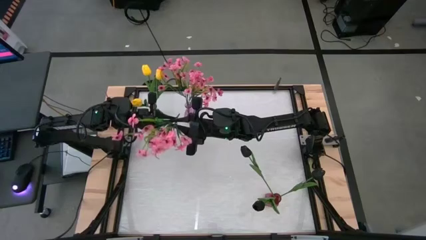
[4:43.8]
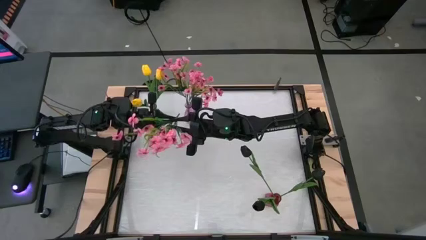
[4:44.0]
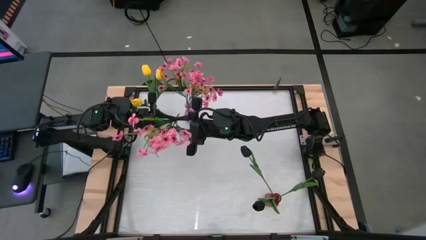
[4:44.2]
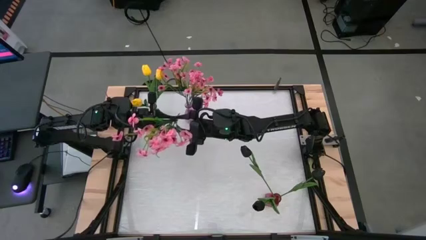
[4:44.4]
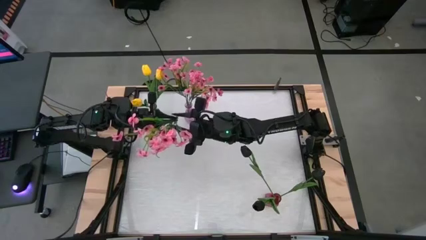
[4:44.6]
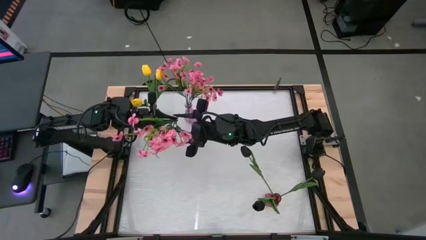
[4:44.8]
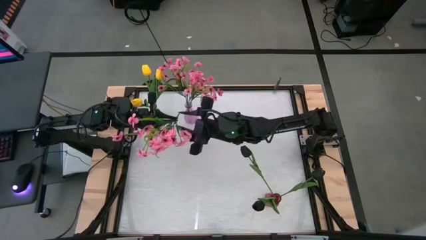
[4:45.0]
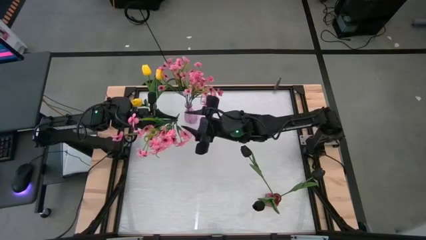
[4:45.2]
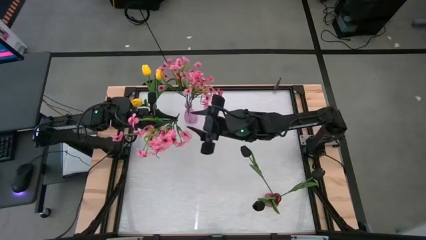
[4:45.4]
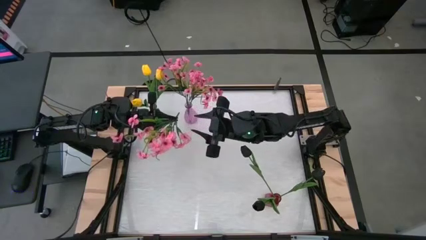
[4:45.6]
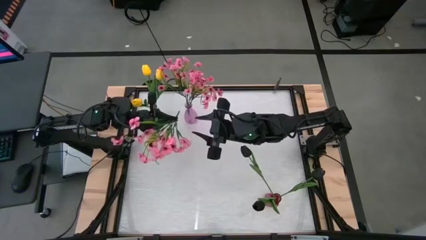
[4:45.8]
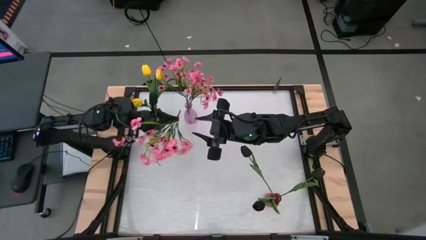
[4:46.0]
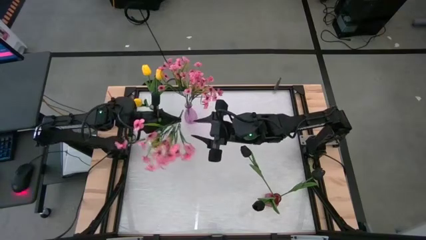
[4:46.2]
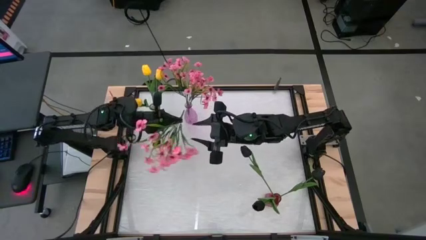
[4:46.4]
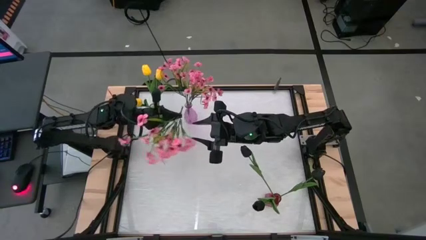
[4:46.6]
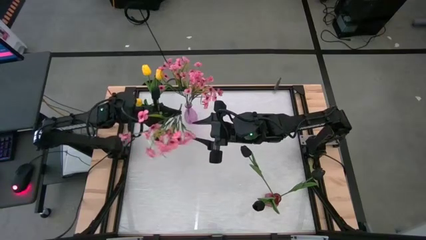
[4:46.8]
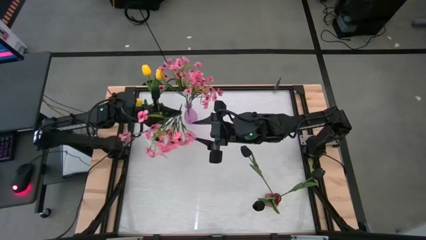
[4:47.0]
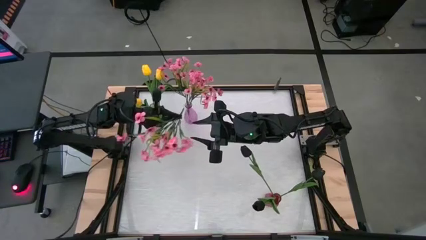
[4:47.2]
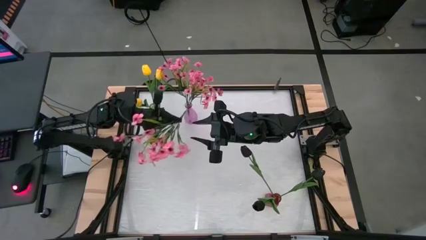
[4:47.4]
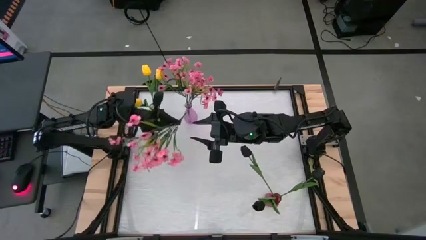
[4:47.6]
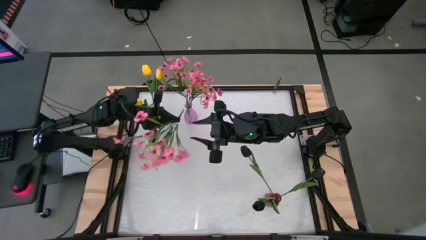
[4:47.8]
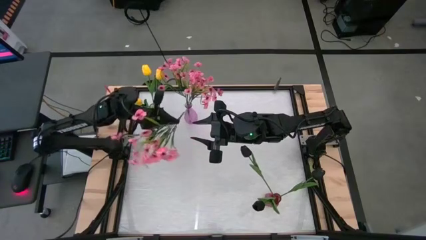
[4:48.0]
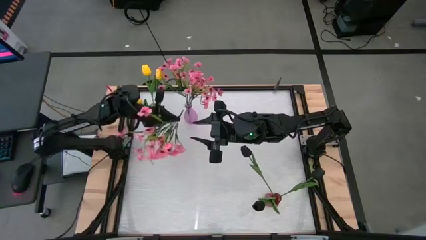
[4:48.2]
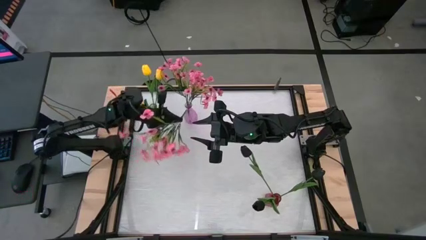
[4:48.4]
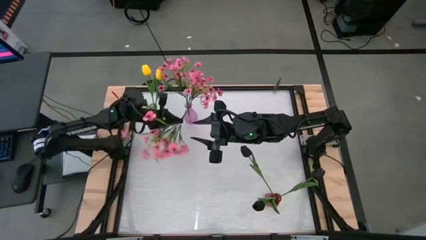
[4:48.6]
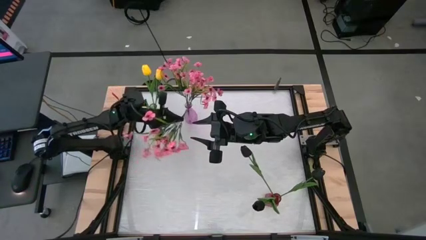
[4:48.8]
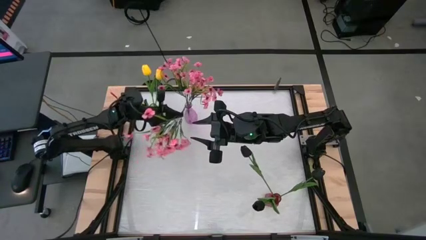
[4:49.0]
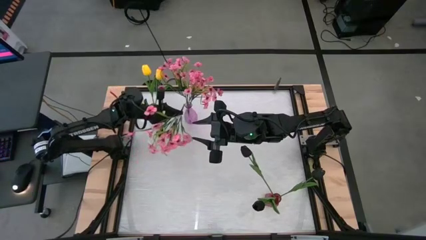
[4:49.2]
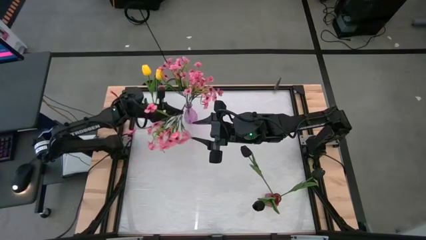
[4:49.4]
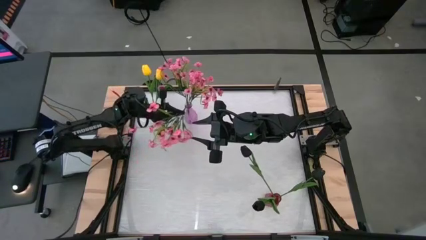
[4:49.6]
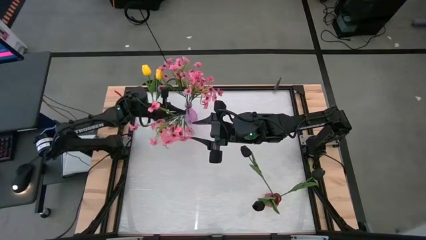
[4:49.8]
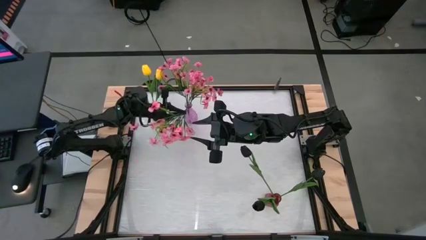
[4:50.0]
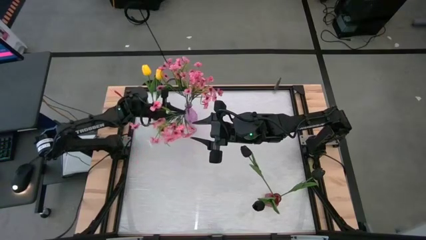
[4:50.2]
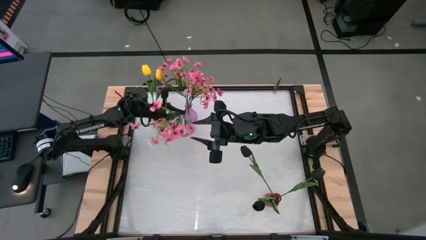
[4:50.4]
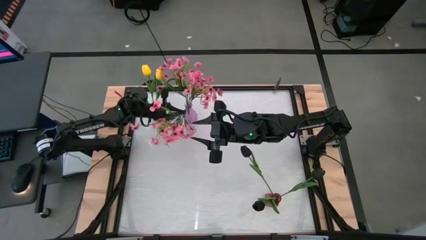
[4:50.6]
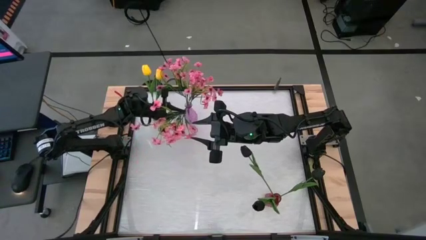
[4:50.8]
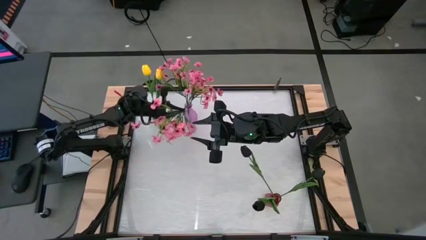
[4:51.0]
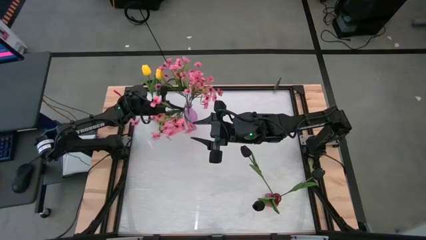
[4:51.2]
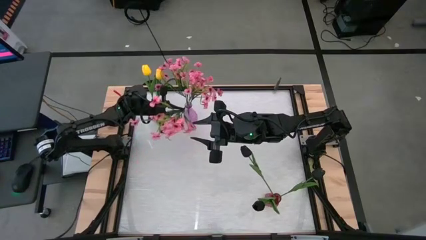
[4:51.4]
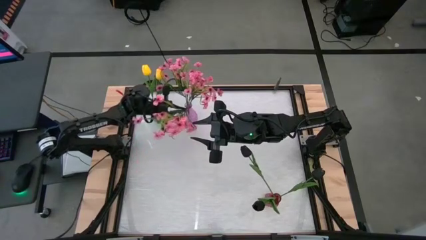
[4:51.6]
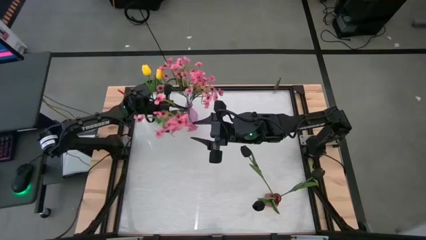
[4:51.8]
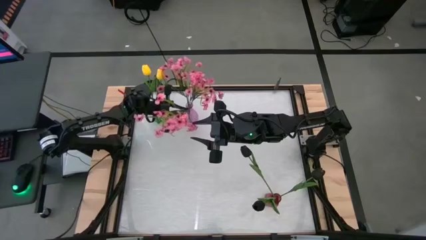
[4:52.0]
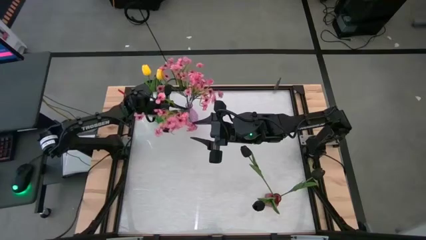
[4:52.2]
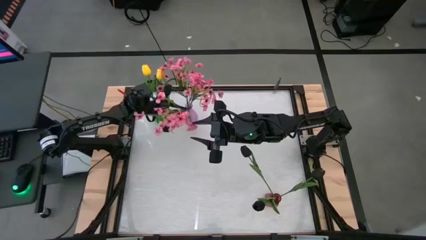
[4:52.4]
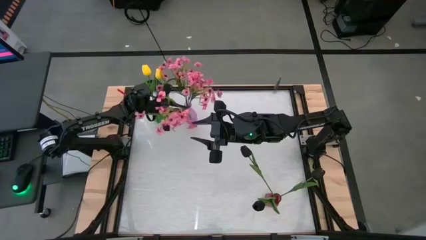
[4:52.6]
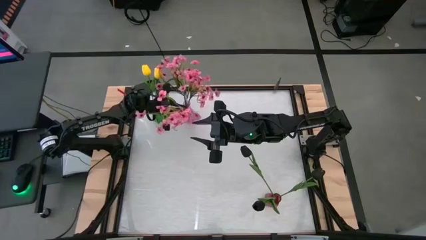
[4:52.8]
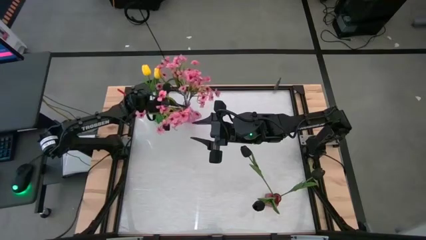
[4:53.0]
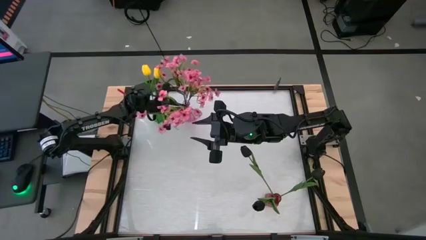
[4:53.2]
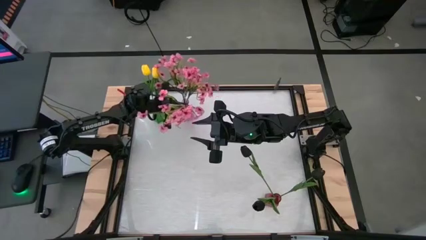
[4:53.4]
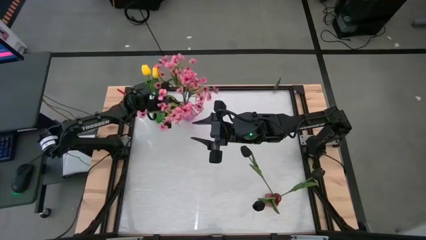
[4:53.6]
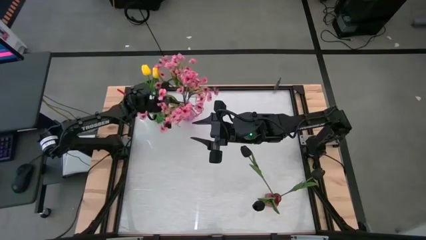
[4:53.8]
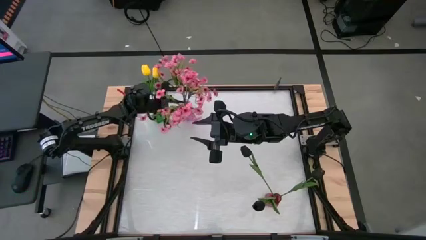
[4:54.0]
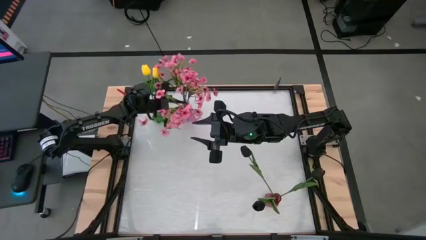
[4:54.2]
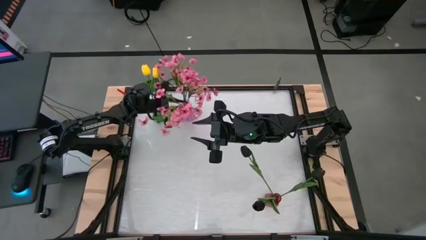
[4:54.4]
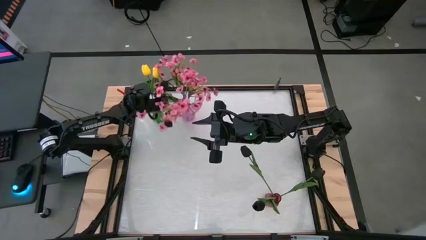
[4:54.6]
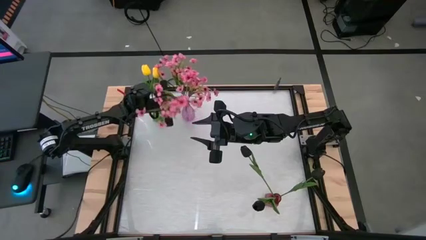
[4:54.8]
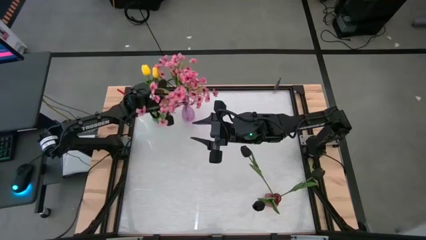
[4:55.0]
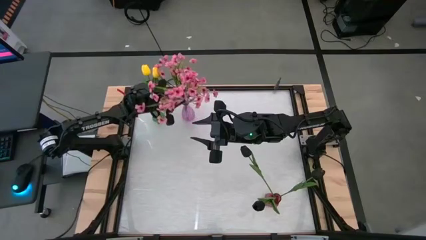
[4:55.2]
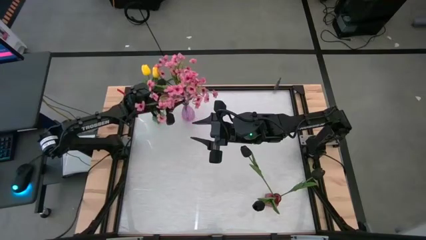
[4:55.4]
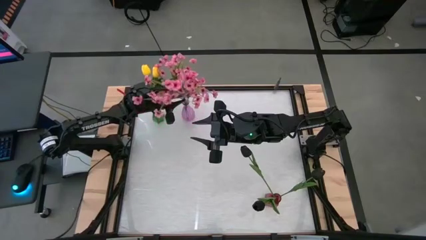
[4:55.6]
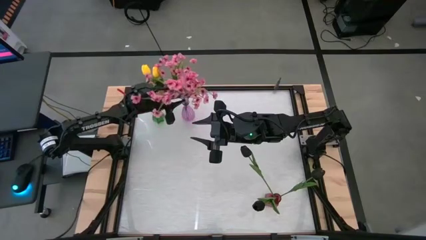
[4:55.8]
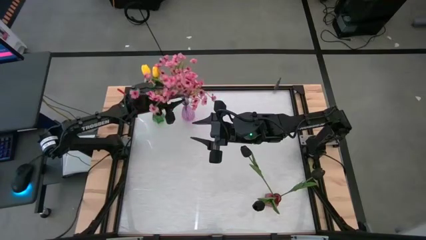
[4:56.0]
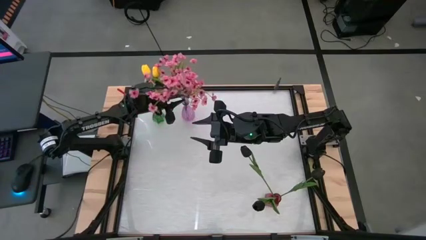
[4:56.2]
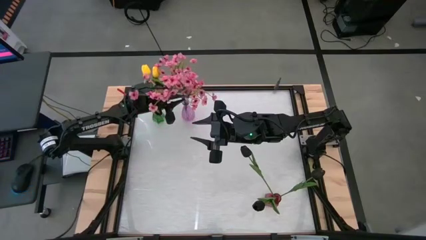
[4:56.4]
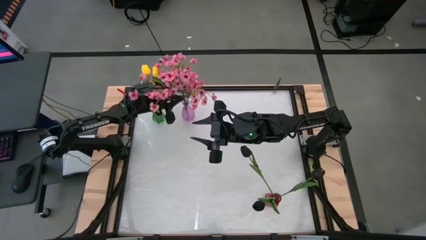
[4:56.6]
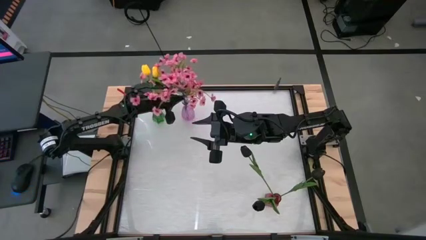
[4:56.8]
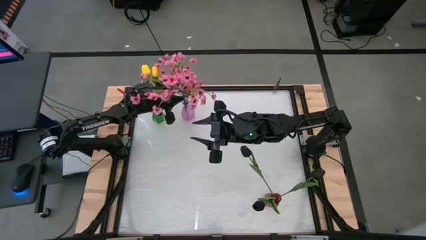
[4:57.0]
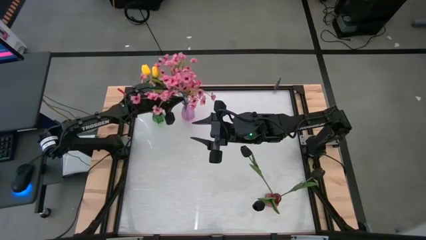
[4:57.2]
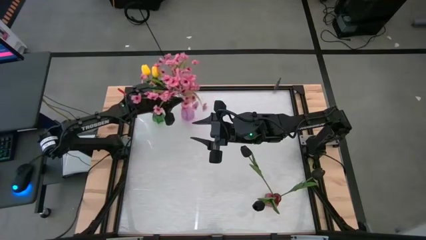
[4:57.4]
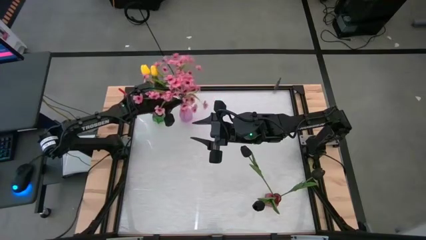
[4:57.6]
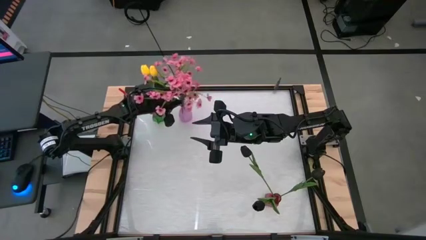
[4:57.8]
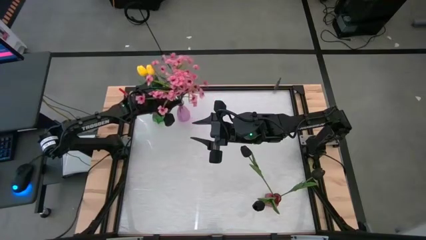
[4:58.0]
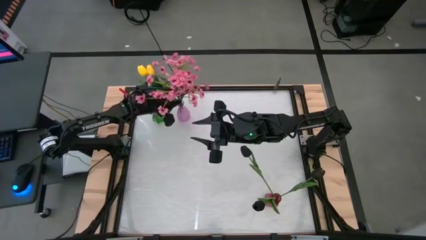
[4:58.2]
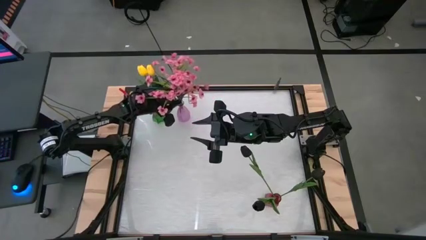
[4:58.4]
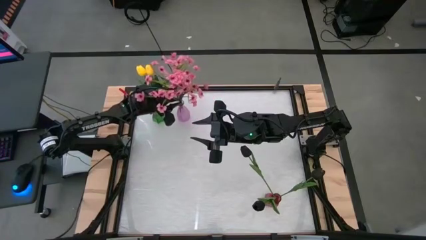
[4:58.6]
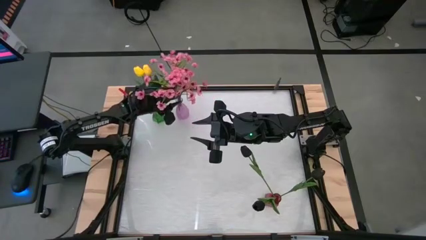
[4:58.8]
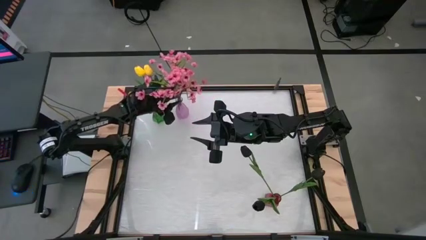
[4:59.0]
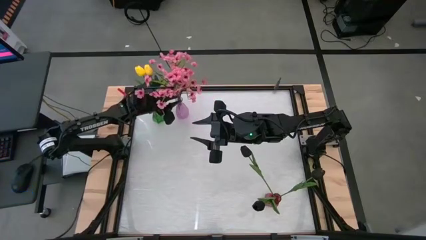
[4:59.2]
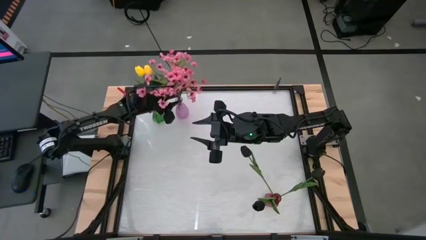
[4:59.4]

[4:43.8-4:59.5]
Task: Sort flowers into vase by color
Put the pink flowers into the purple vase
